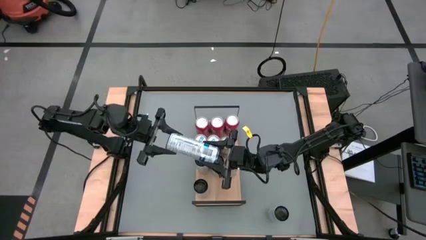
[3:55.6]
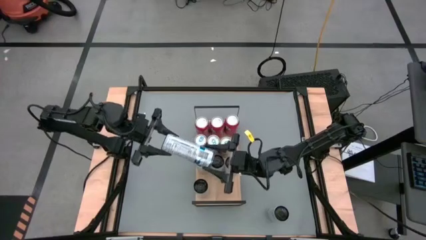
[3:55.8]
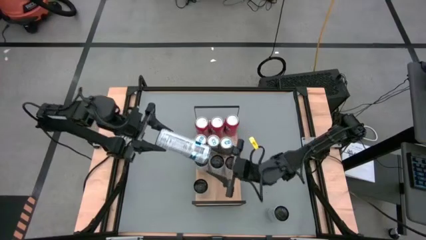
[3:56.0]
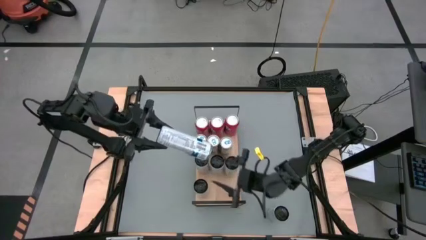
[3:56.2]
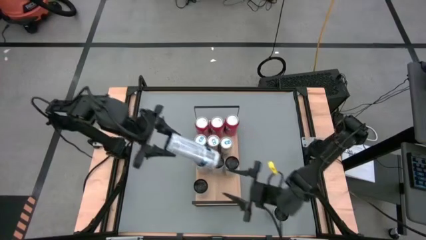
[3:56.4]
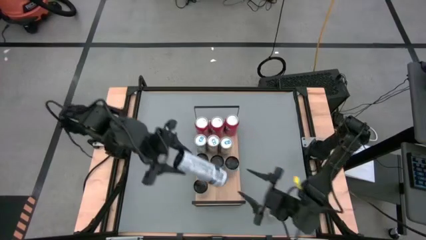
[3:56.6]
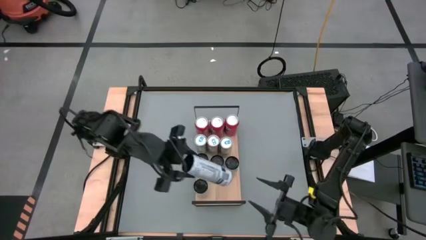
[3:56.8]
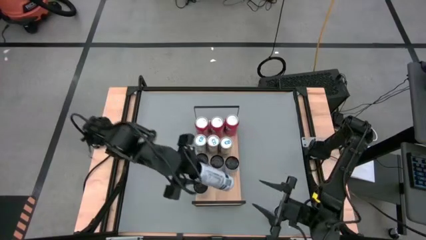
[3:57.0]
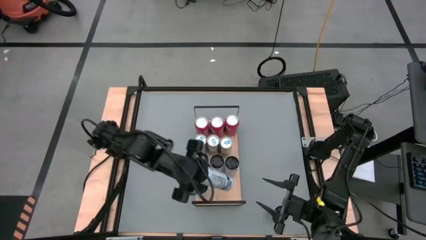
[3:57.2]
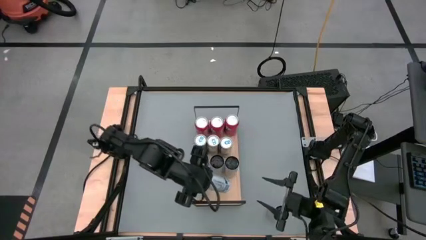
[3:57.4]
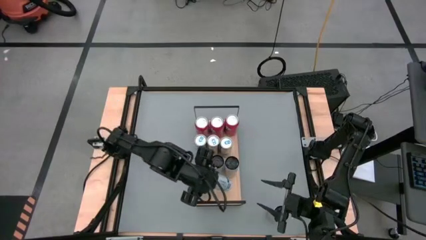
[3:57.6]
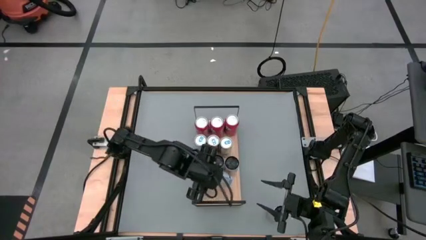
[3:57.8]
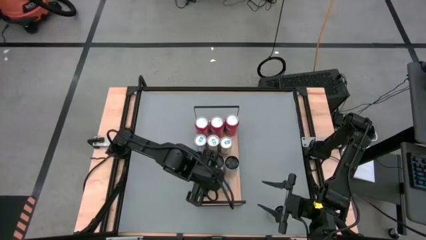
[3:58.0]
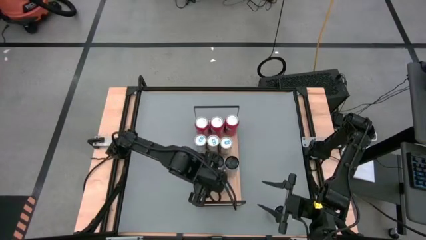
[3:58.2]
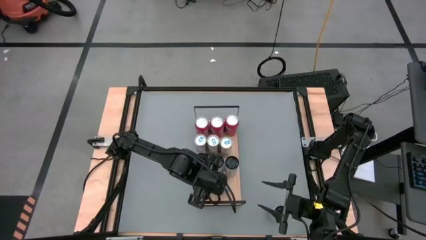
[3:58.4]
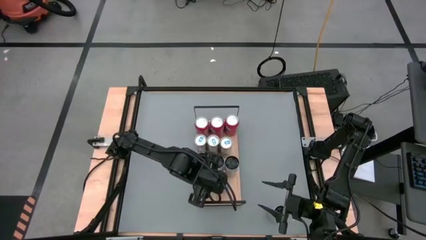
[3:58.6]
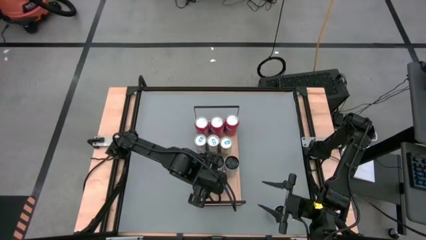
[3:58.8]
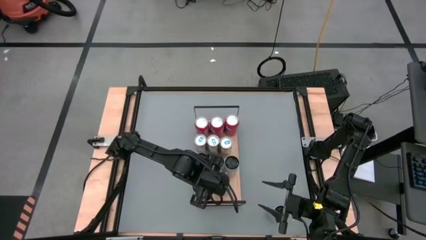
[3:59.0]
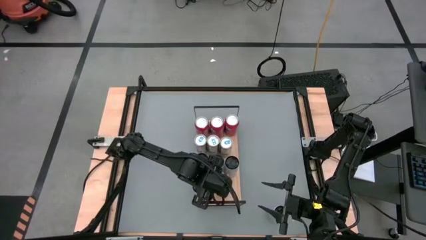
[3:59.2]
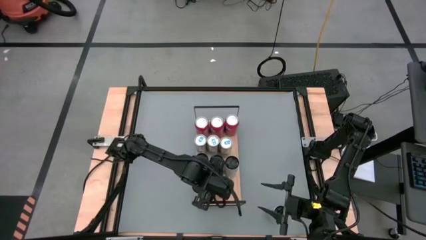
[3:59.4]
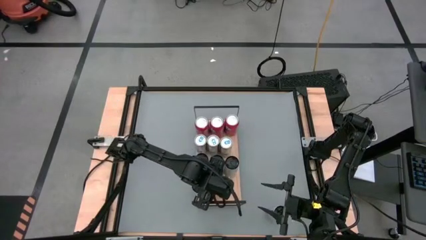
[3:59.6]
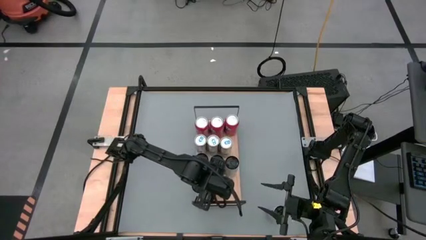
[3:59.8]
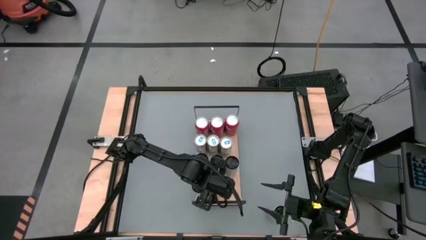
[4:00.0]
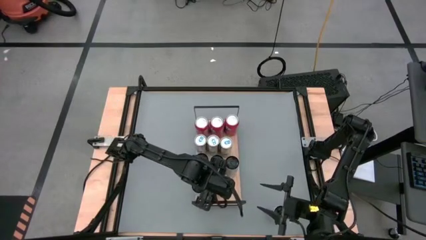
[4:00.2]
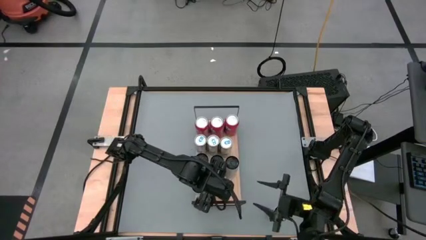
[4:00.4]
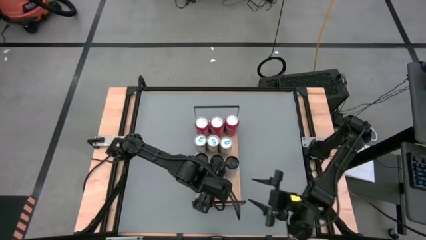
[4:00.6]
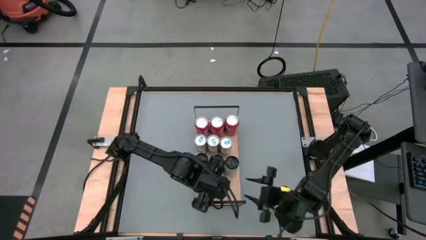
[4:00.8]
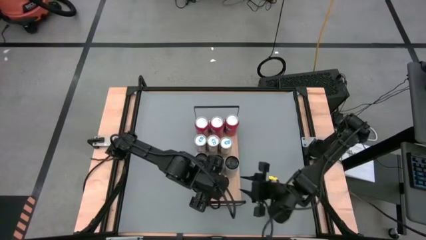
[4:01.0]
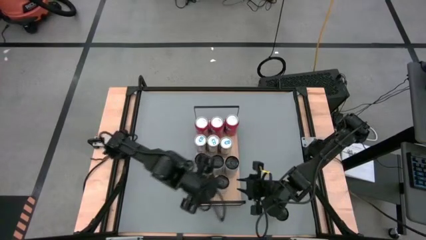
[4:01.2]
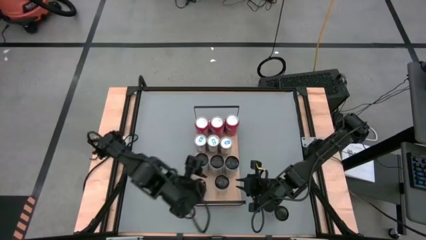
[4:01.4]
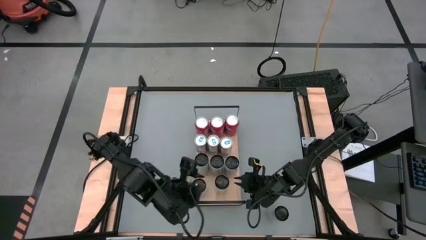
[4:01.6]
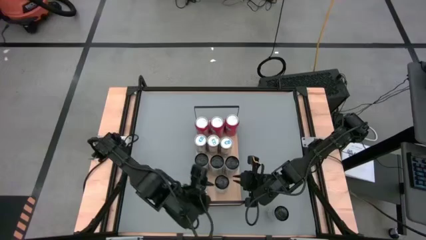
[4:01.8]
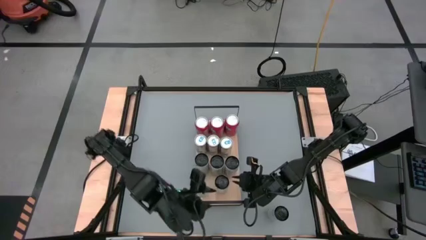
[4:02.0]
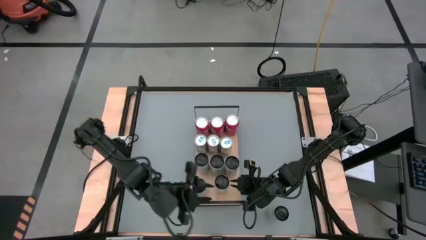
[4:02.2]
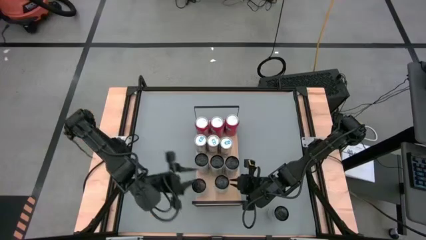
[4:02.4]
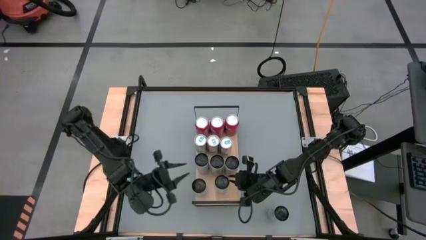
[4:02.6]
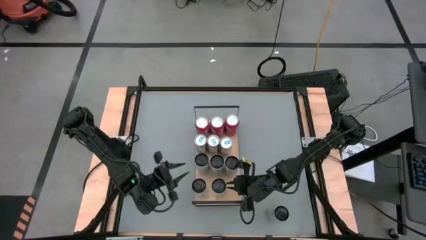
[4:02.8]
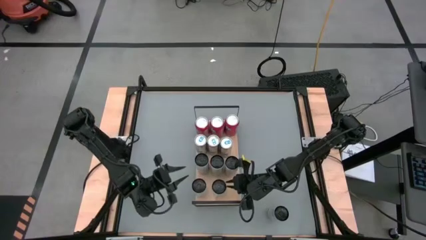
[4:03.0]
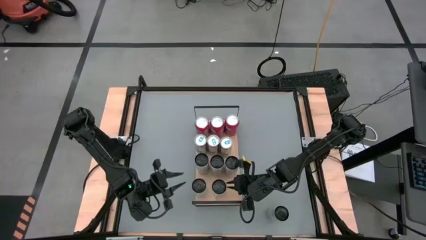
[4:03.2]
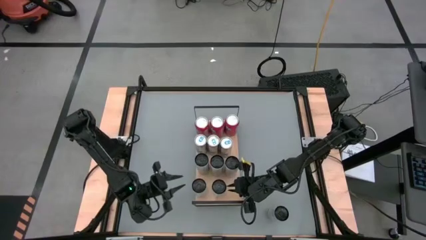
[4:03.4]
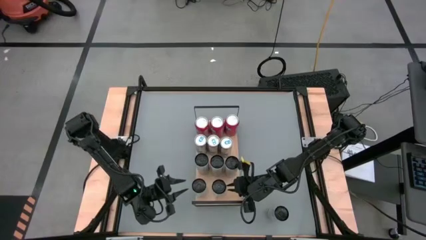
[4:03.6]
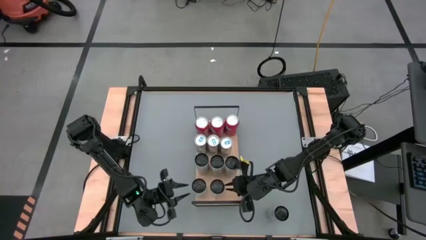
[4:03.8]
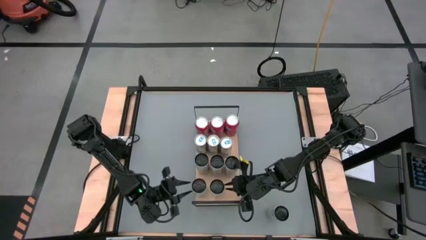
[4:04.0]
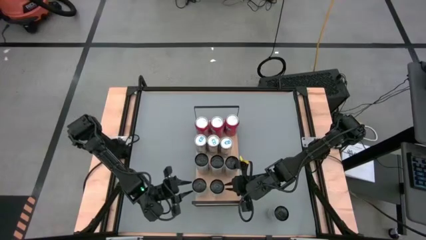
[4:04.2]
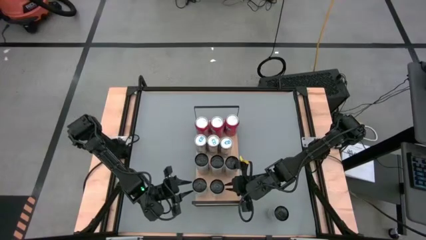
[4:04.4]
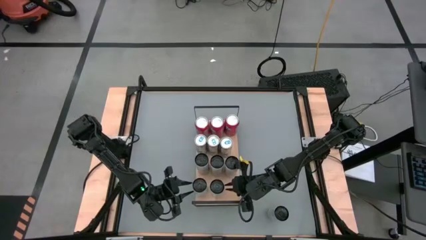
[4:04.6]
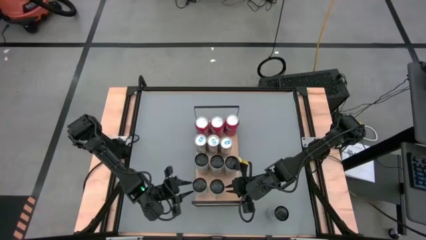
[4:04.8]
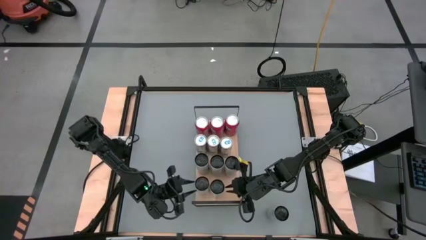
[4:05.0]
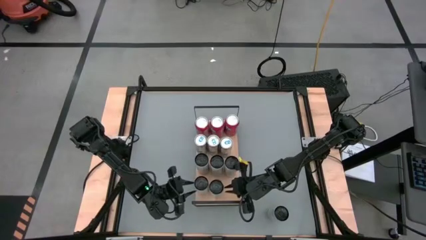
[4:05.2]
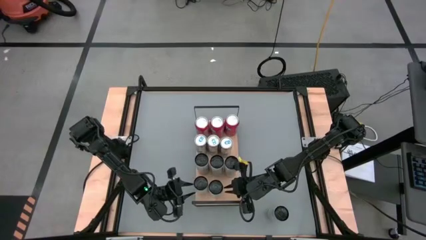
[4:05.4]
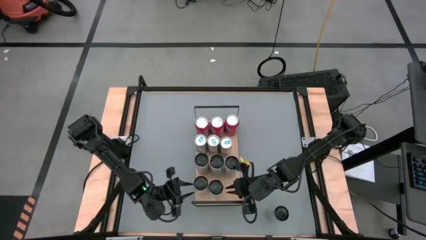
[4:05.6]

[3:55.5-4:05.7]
Task: Place canned beverage on shelf
Put the top white-blue soda can aligned with the other white-blue soda can on the shelf
